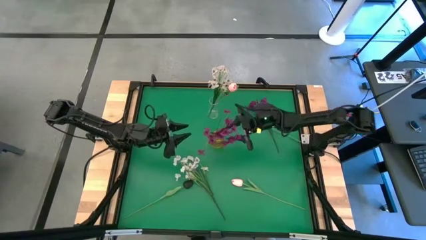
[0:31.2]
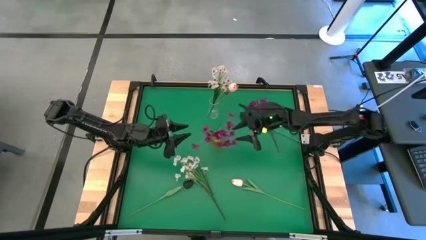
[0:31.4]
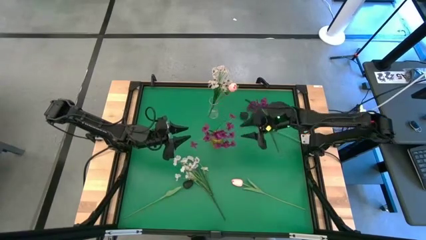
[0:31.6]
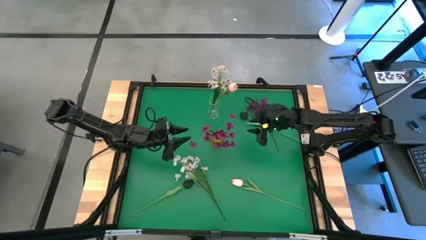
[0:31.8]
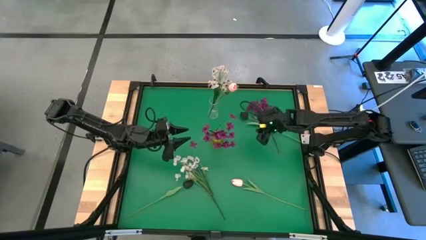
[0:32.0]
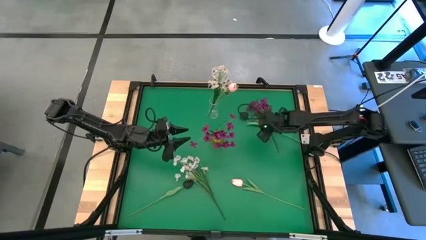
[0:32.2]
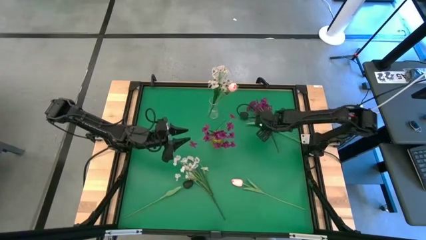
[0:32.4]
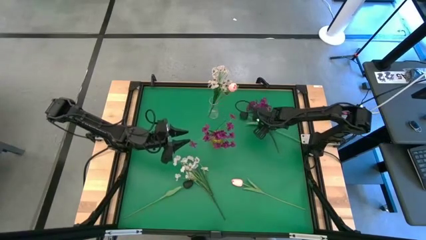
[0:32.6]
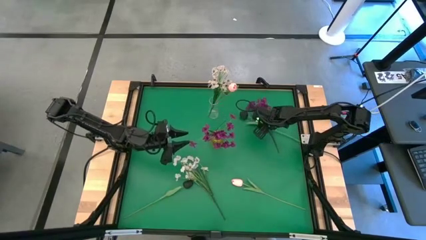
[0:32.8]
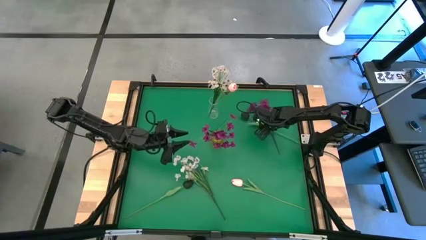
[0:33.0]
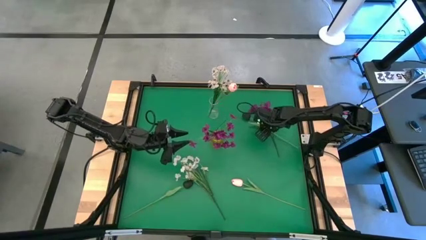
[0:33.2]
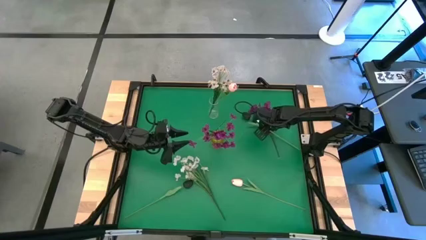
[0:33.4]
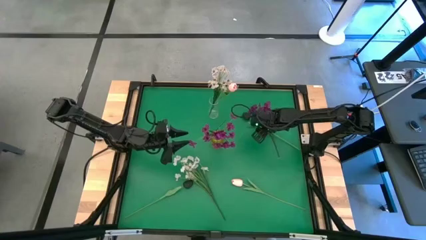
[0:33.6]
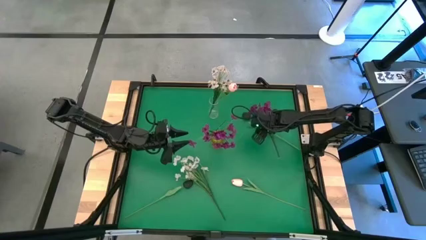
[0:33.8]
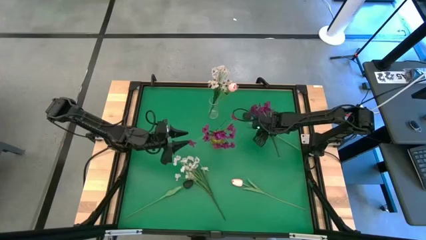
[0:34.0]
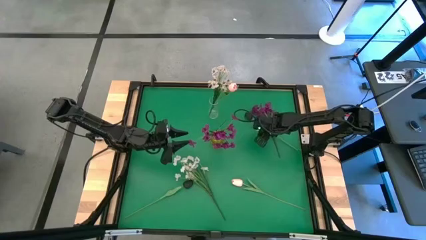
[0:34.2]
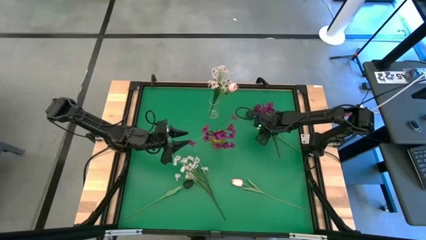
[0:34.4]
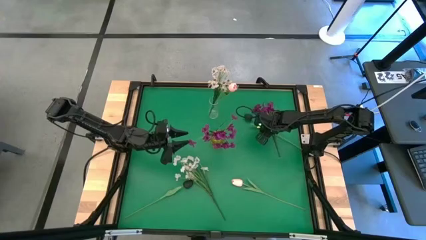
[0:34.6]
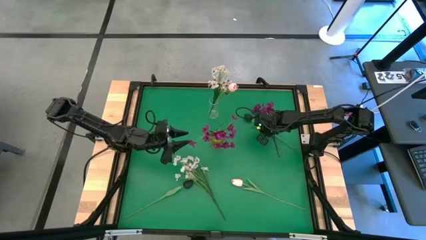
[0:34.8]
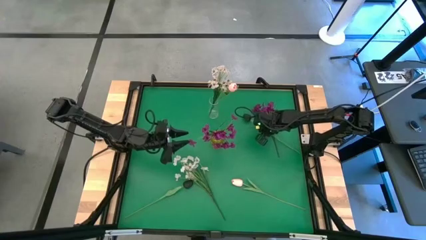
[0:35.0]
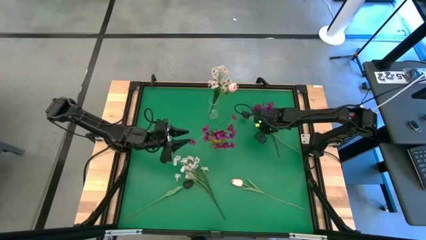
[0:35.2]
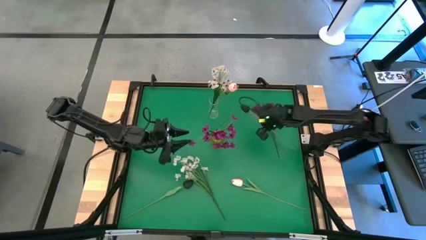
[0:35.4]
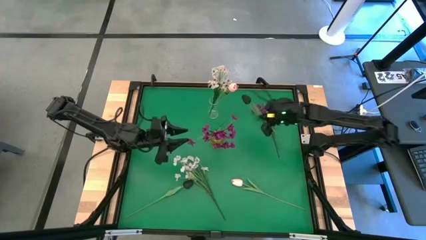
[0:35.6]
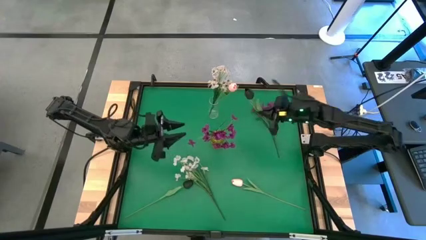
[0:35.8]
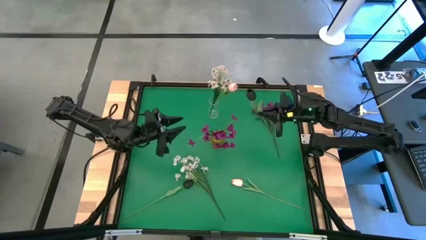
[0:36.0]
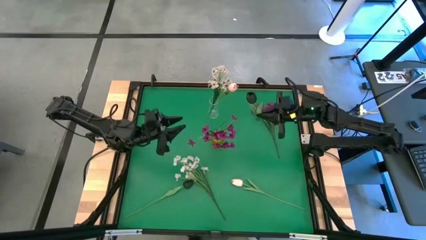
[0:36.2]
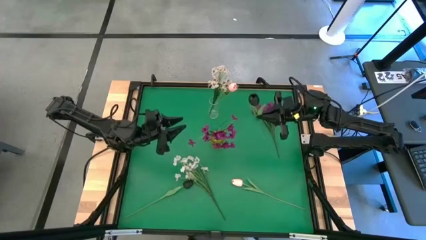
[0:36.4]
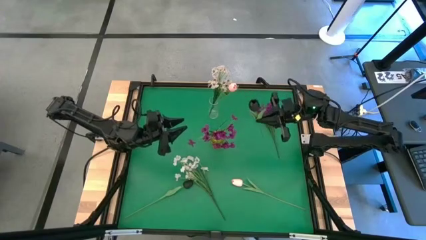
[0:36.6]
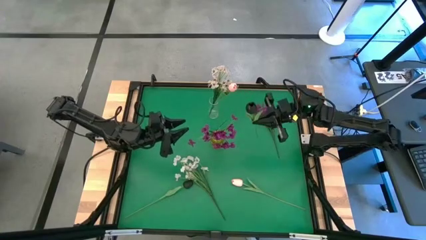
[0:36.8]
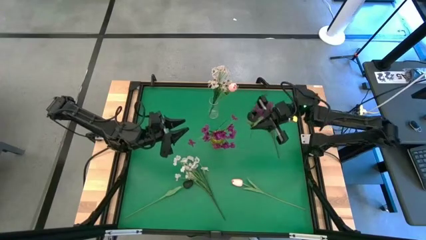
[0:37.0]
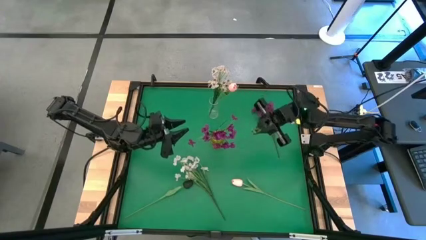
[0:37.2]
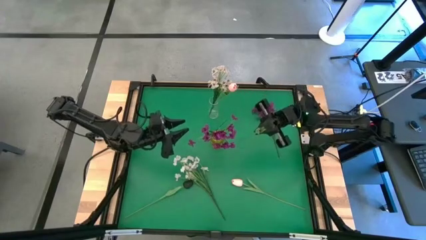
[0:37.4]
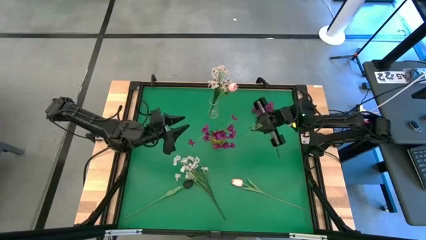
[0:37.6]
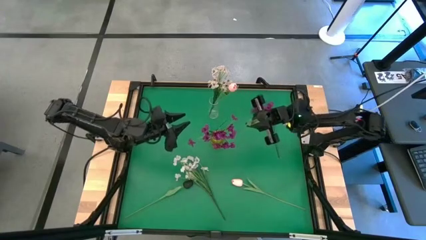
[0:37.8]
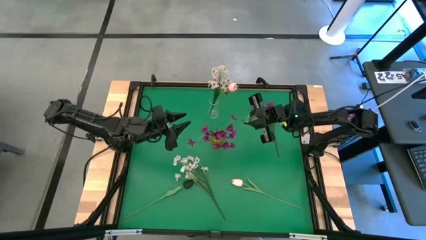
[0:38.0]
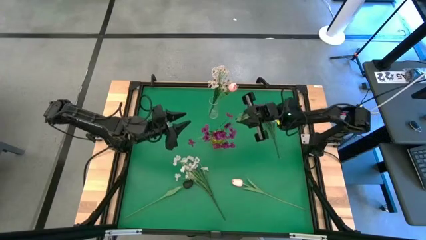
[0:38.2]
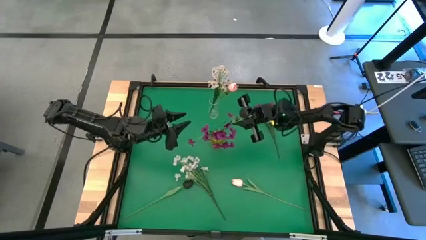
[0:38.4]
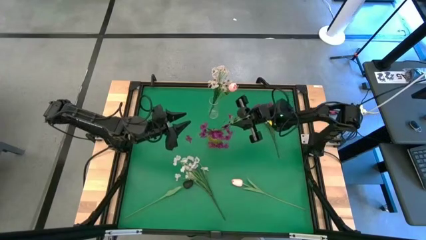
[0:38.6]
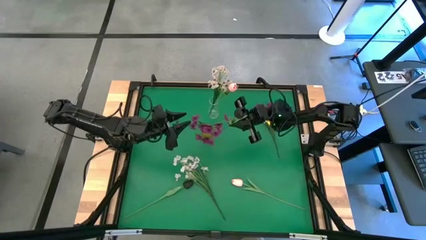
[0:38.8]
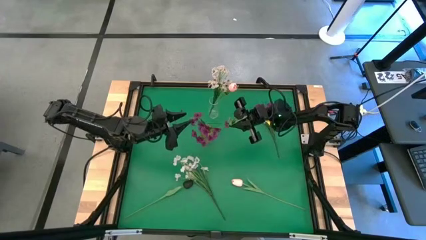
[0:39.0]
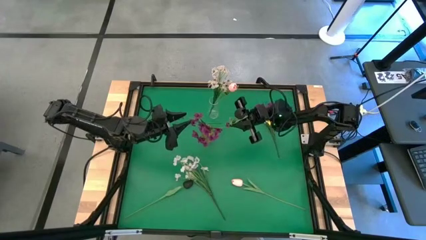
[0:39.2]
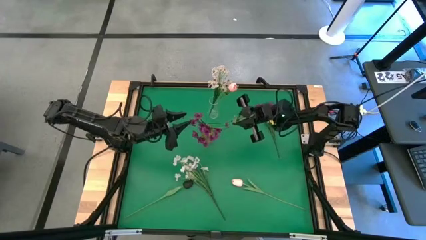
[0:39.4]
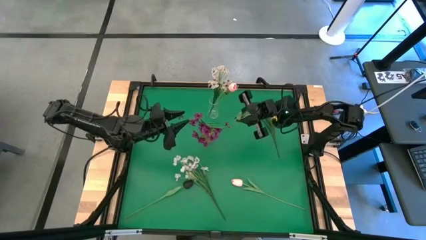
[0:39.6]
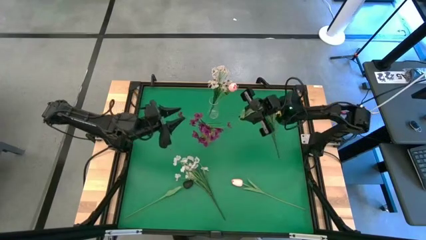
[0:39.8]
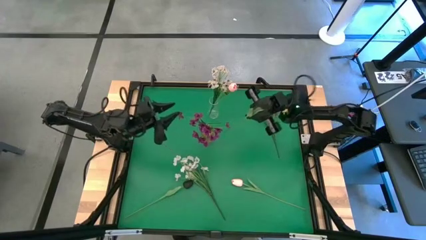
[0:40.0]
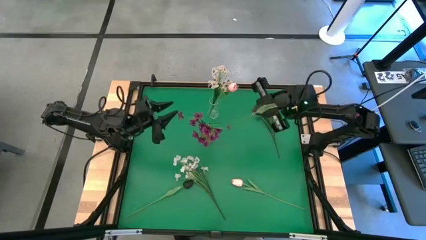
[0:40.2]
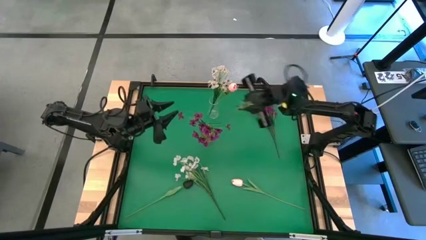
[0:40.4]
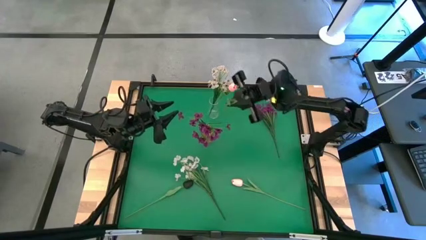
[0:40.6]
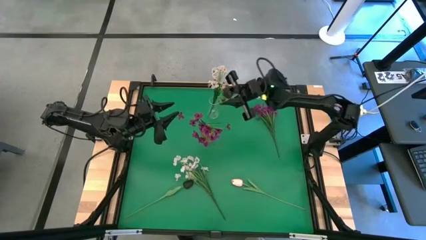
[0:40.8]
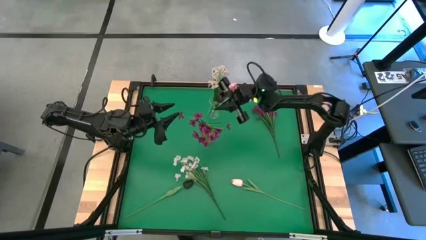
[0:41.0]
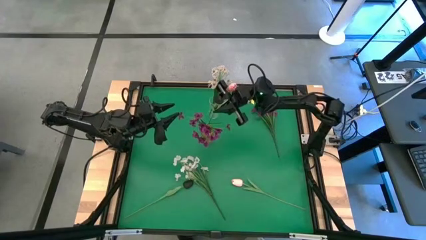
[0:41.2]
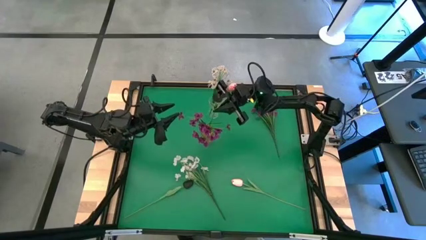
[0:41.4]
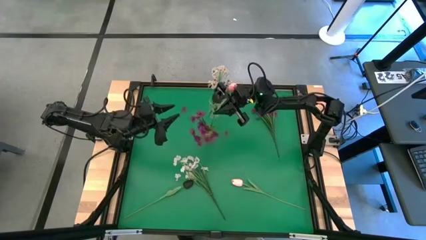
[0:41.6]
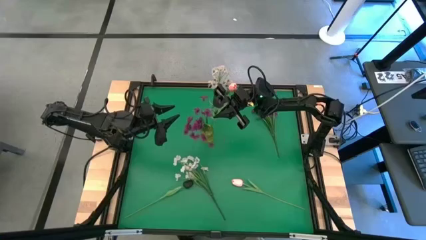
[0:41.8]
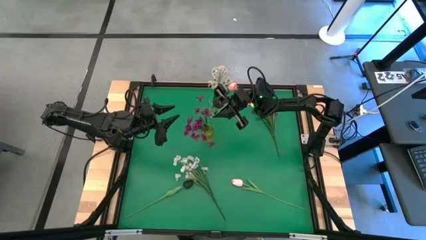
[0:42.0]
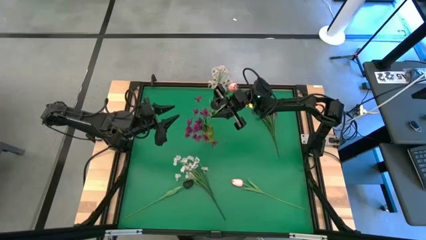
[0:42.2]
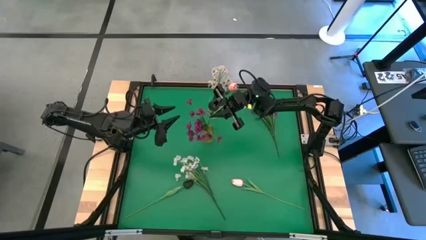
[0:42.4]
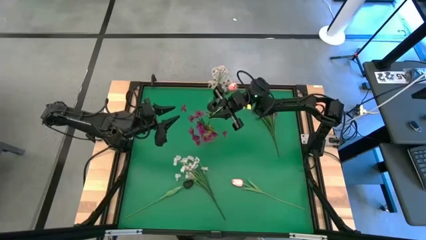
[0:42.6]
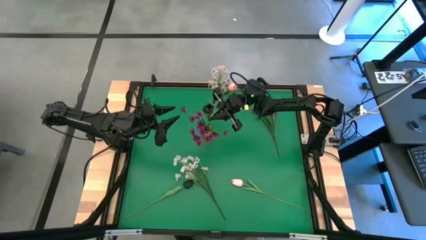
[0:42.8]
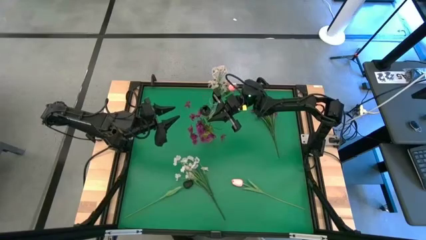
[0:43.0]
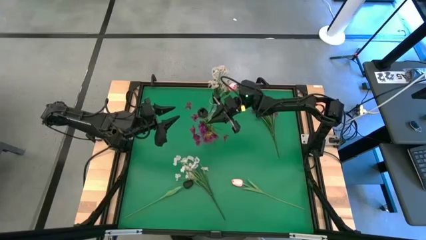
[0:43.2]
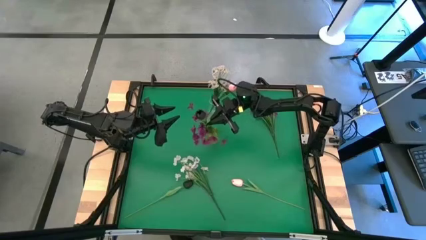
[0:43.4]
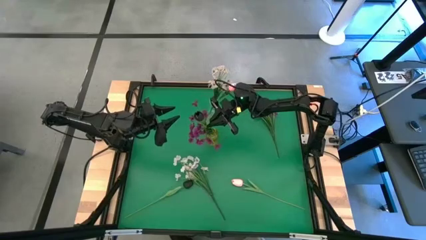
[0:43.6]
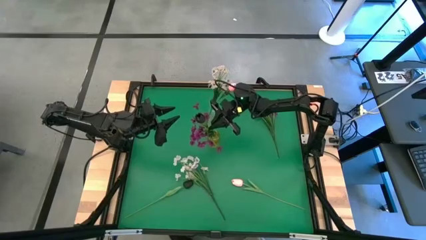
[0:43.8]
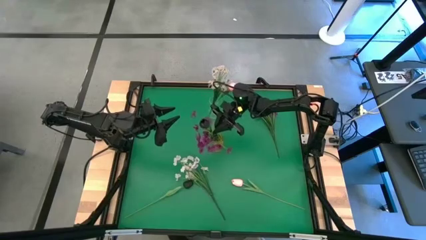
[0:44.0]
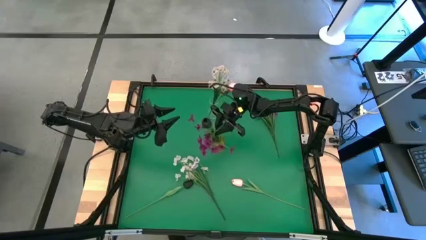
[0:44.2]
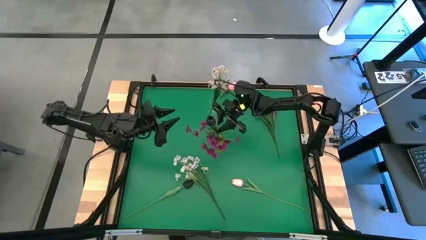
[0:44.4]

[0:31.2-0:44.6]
Task: Sort flowers into vase by color
Put the top black flower into the yellow vase
